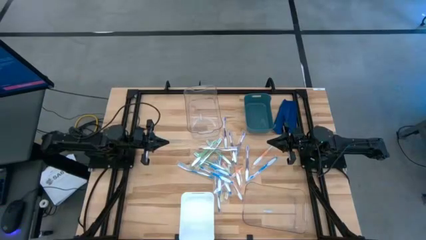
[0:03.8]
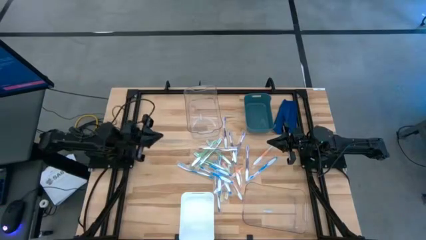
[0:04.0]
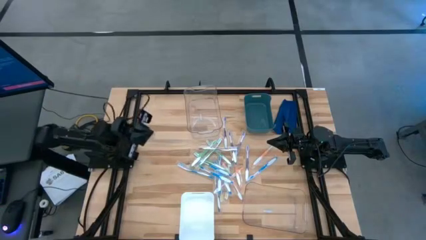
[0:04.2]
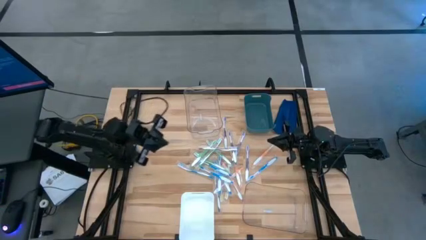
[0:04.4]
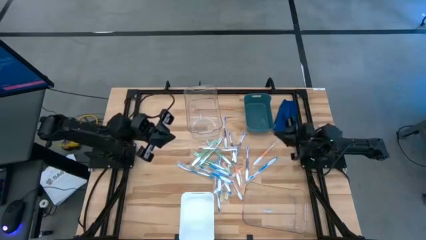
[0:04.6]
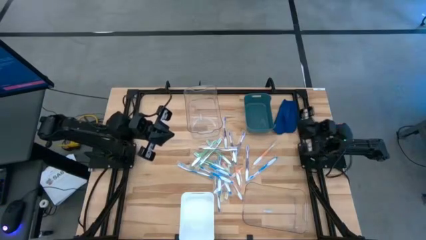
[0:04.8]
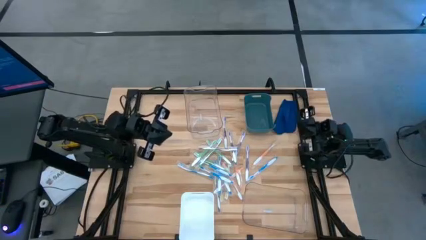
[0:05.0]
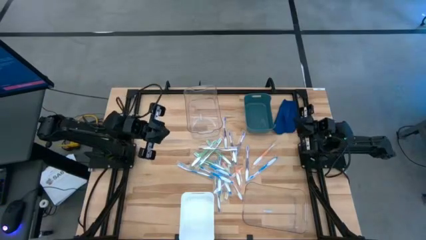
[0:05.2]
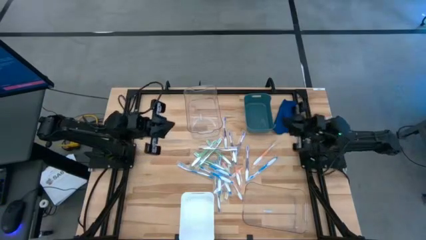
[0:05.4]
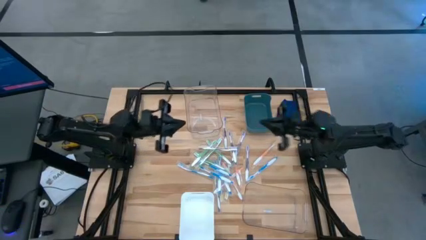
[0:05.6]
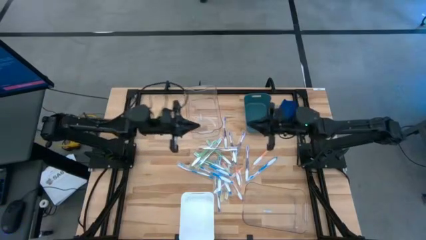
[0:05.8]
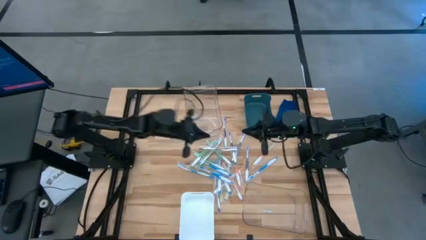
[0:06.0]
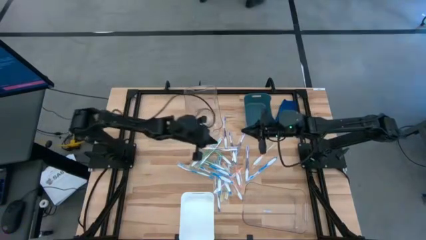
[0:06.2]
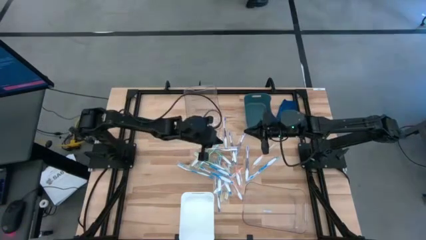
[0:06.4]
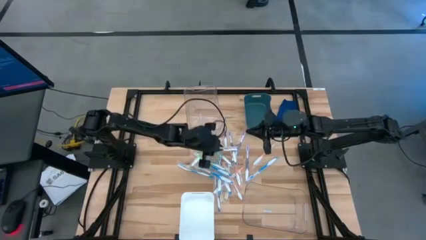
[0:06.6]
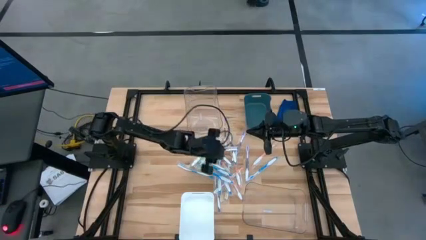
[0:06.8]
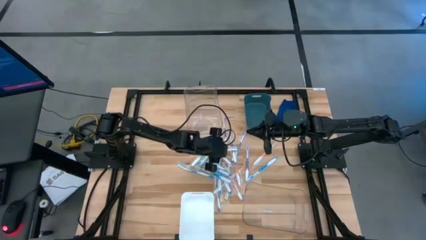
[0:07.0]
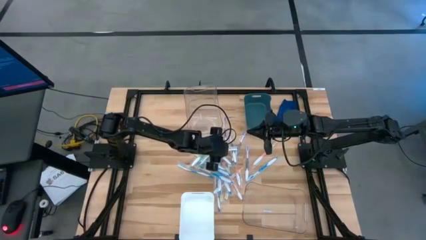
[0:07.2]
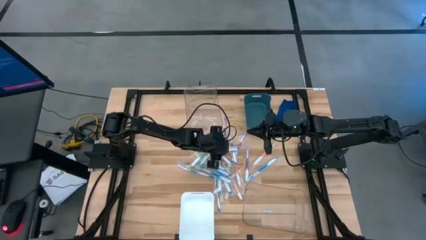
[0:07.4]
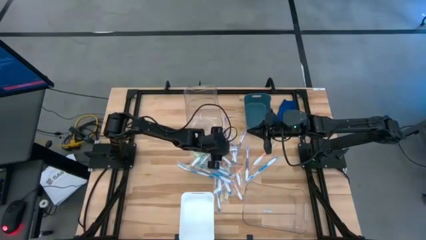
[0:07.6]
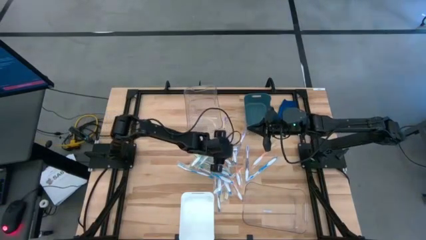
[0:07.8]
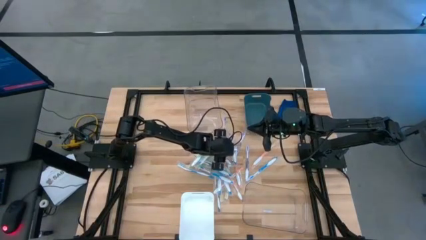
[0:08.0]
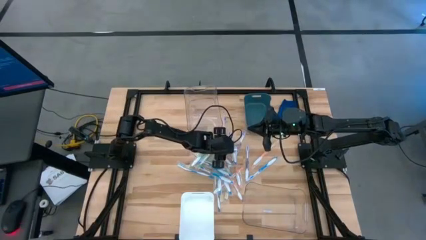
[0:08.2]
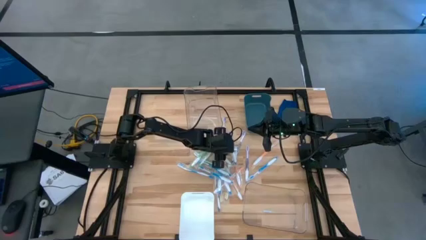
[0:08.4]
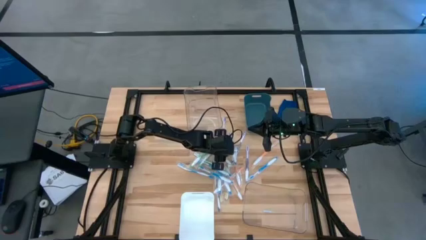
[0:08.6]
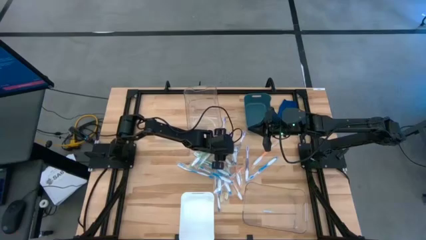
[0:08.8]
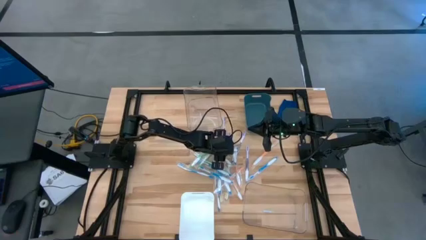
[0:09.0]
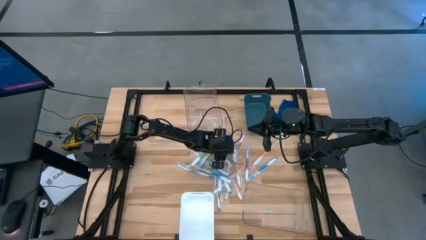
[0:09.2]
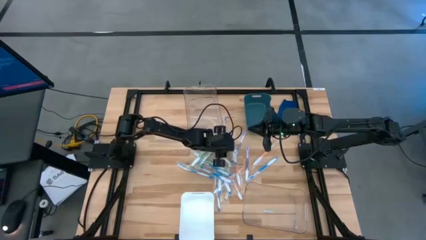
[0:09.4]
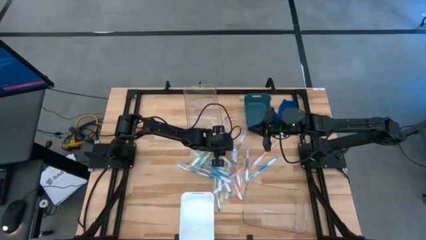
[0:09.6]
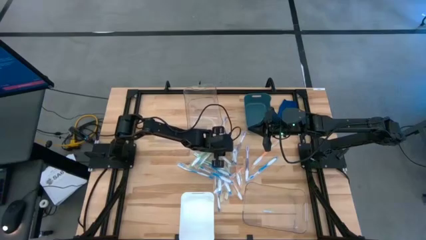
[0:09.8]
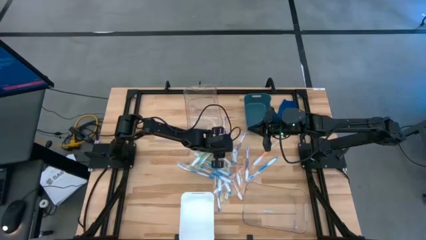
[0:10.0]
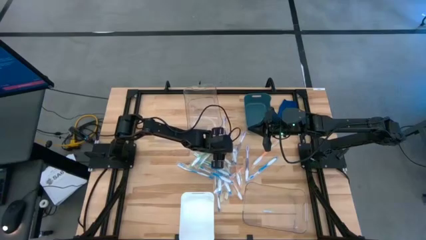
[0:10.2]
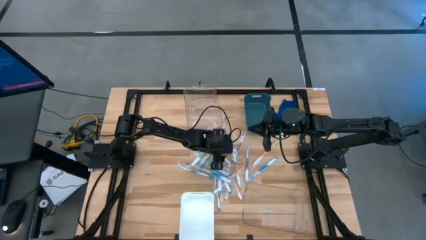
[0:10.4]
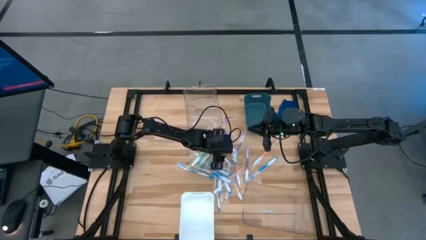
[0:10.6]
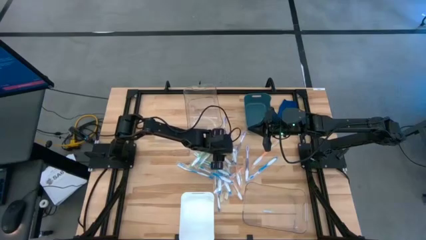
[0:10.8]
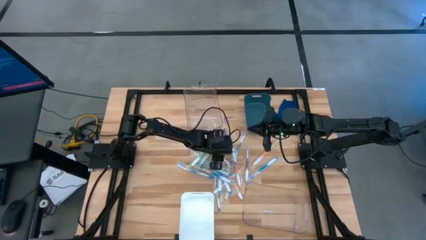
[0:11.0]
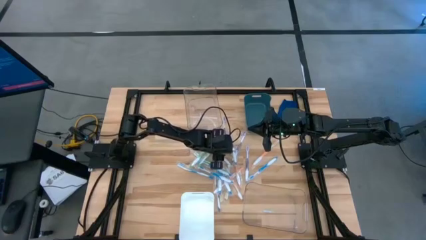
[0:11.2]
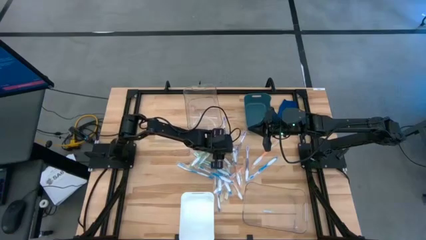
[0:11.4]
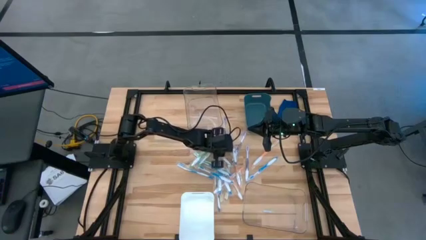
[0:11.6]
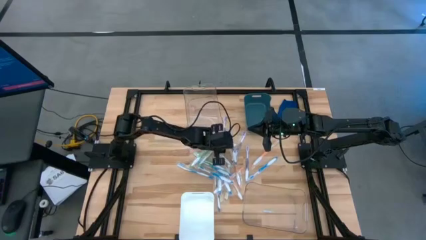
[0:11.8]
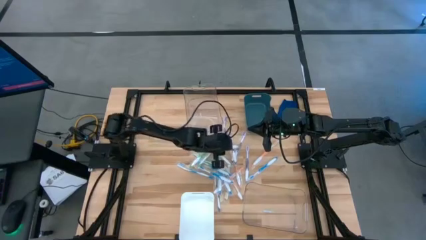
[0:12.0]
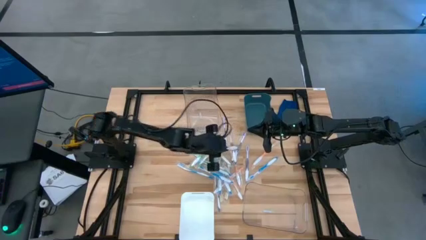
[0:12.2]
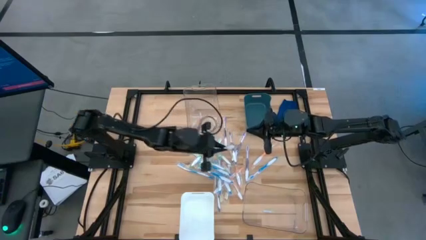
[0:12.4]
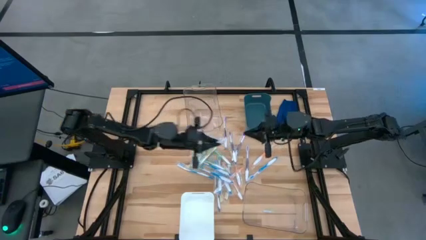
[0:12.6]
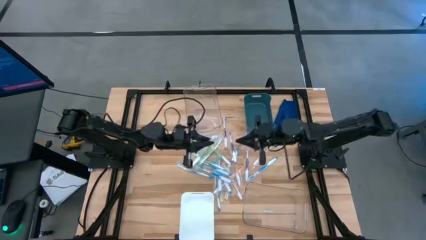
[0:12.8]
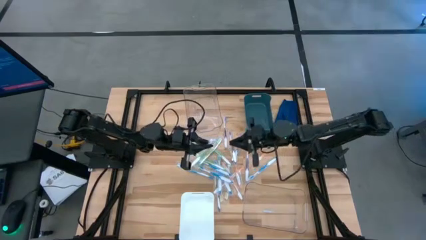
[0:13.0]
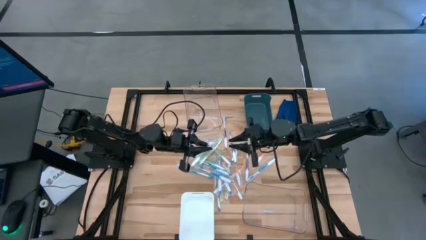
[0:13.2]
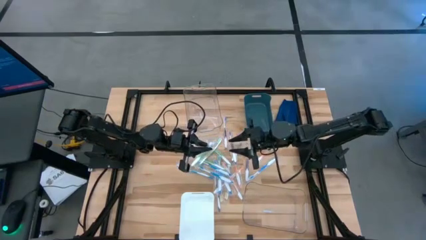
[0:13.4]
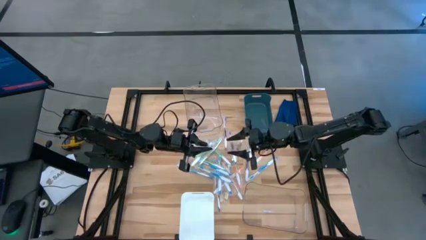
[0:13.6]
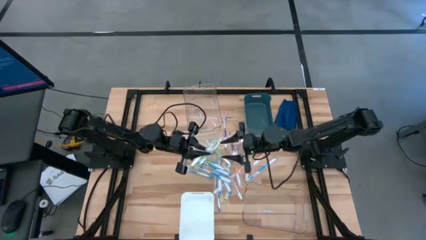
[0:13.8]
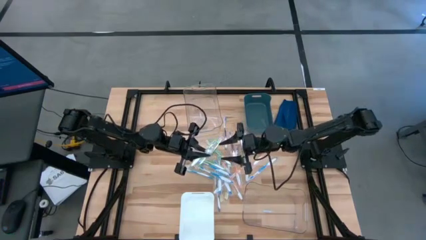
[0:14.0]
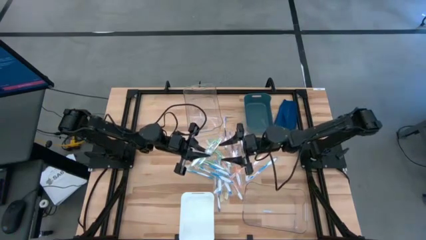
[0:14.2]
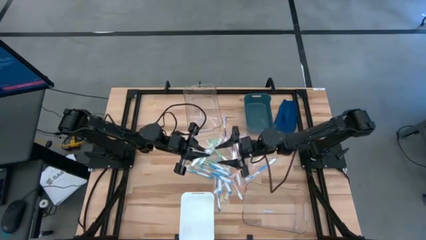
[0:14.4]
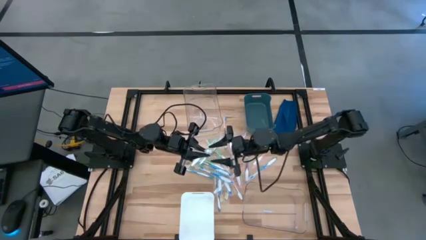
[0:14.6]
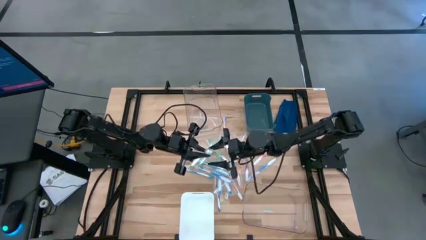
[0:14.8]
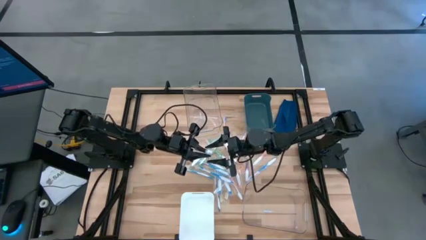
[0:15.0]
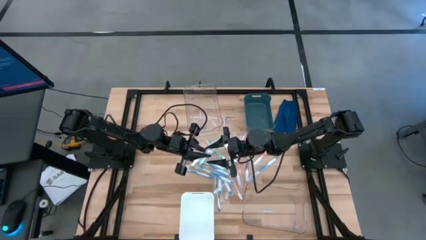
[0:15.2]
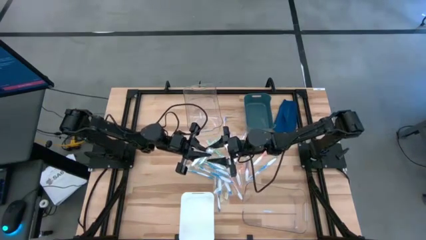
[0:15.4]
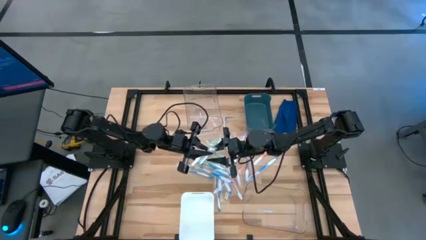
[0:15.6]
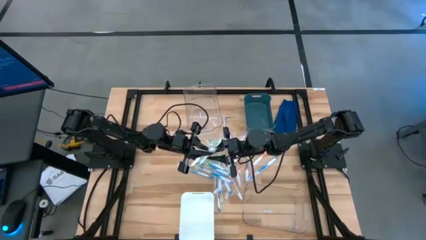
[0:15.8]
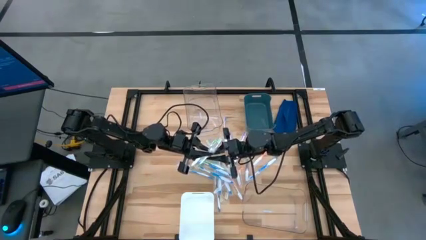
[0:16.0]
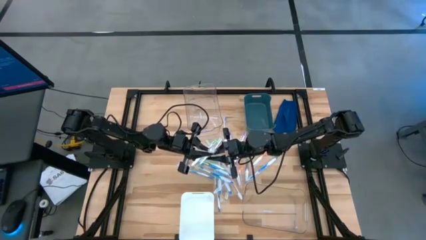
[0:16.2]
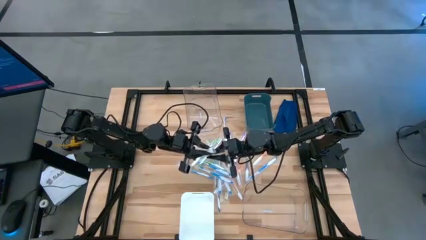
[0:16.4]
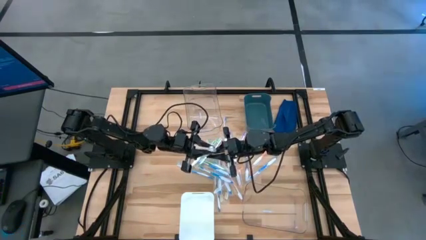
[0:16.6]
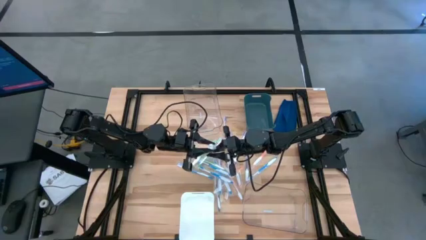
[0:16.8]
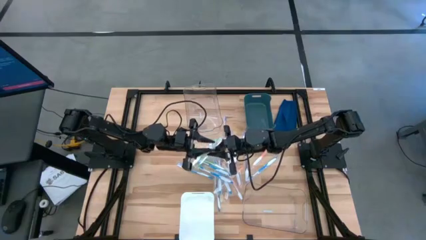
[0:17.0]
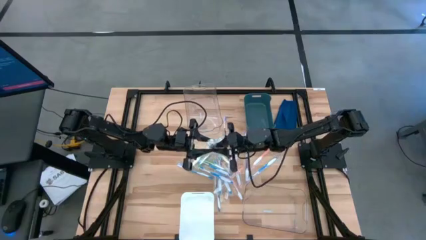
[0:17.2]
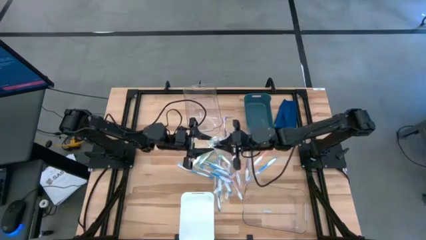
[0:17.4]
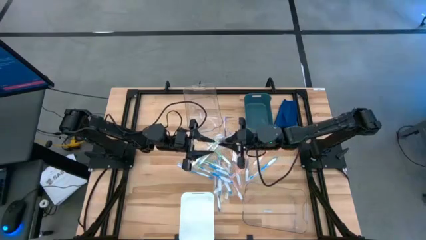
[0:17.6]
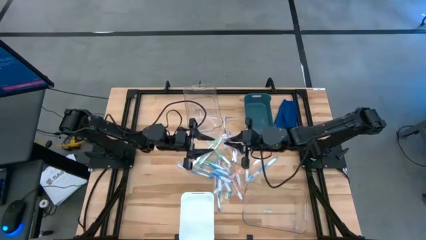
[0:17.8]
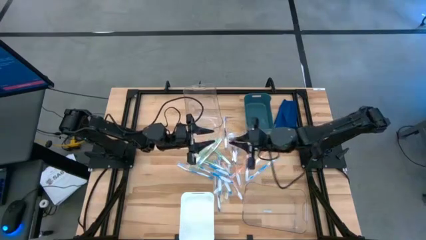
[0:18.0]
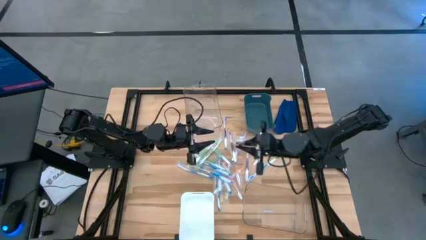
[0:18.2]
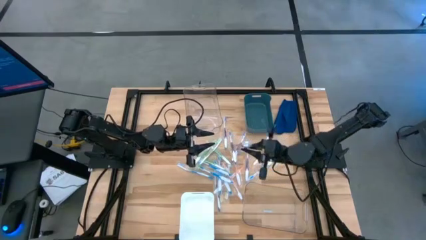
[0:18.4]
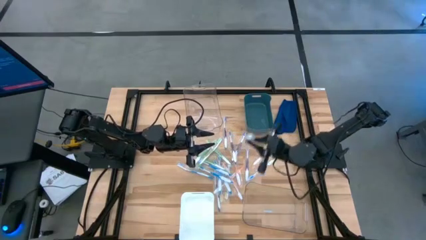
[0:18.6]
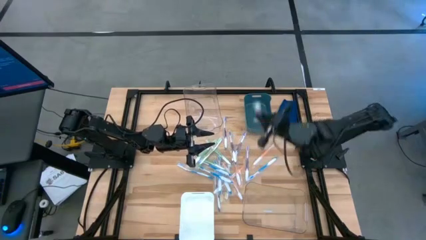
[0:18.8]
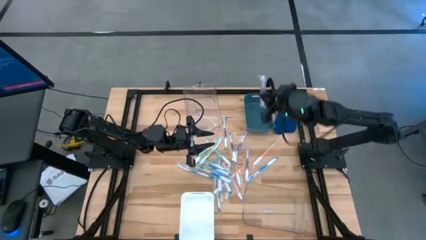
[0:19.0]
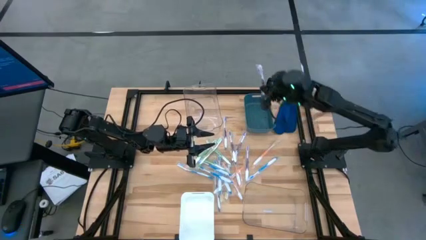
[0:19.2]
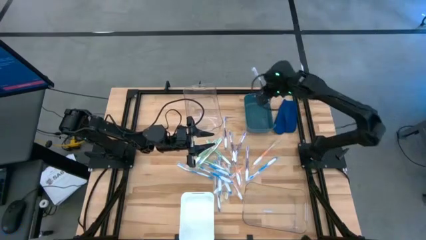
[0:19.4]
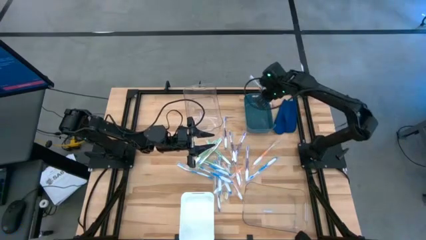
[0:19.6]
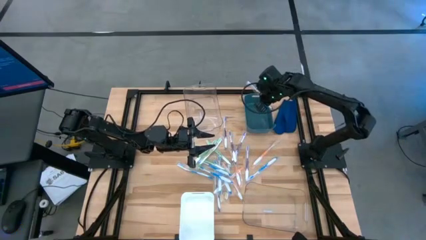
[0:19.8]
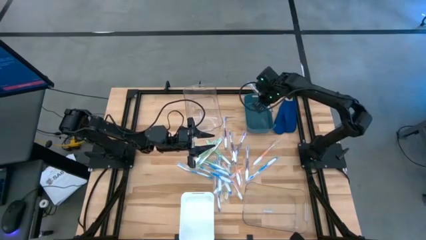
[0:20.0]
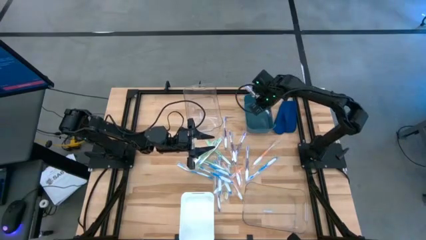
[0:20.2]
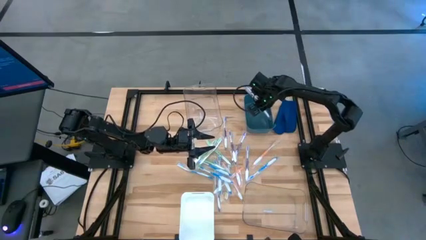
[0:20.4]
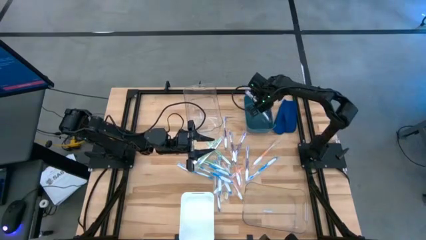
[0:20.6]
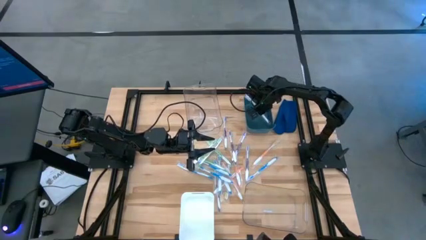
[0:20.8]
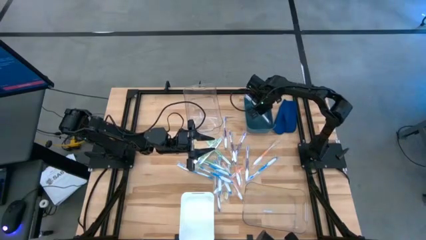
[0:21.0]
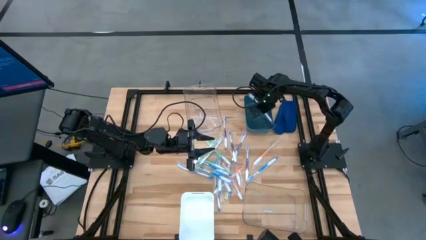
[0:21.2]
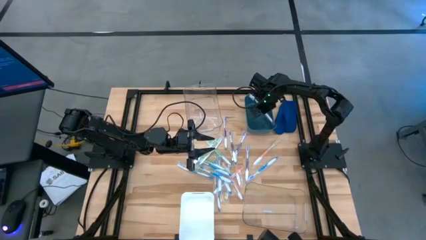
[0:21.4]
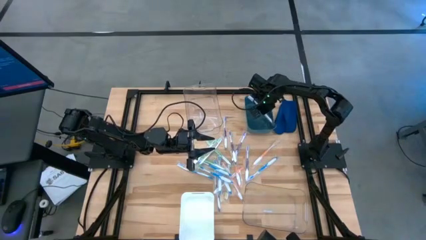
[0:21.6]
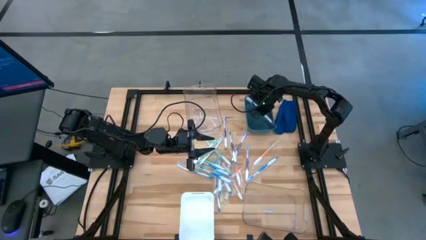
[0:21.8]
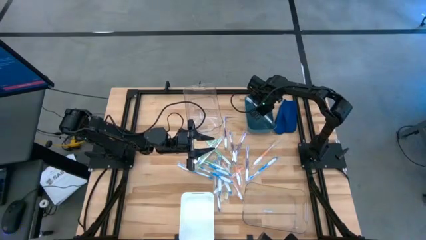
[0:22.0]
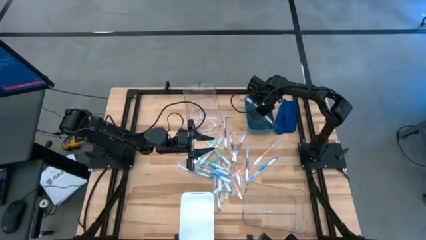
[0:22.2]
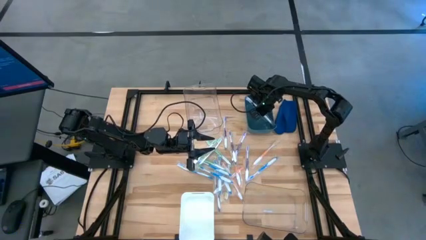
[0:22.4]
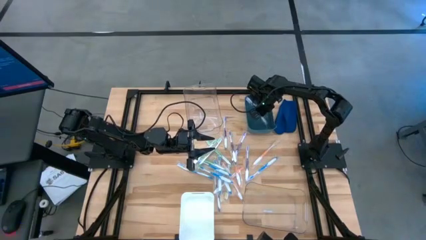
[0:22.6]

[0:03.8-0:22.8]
Task: Pick & Place Toothbrushes
Put the purple toothbrush into the green bin
